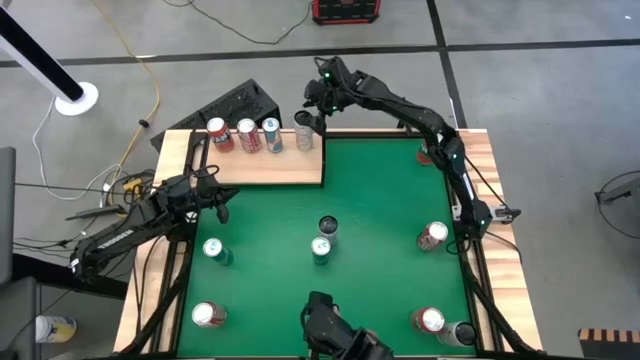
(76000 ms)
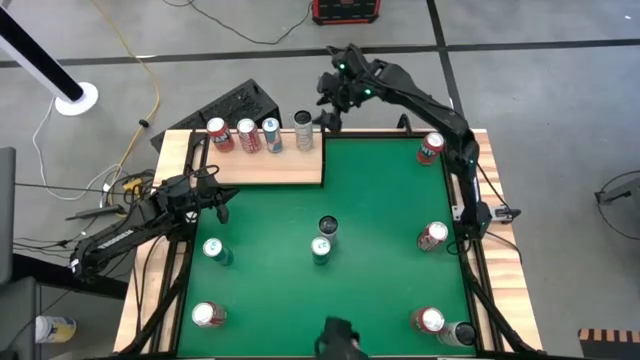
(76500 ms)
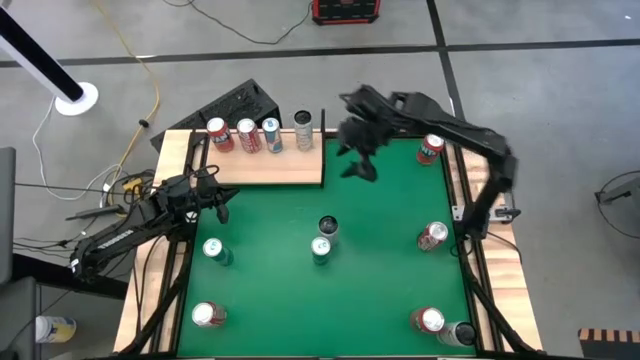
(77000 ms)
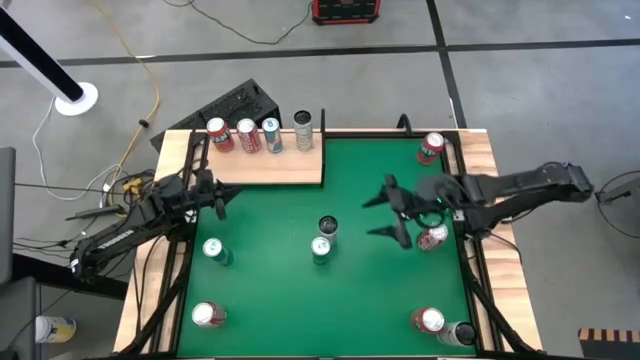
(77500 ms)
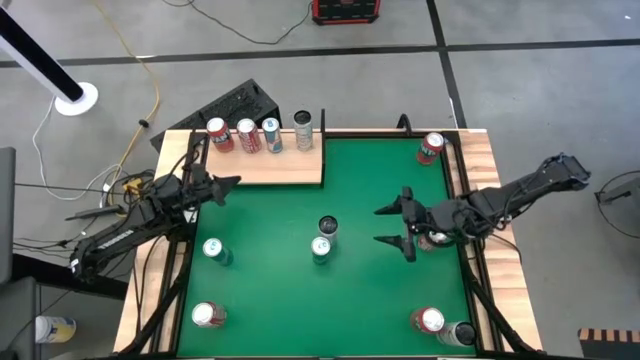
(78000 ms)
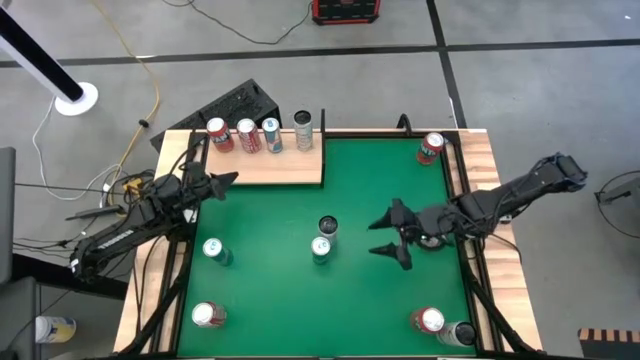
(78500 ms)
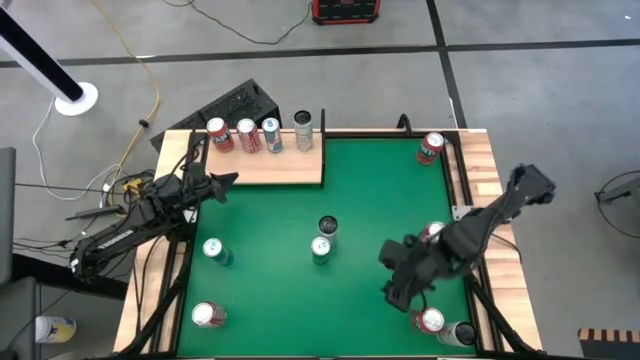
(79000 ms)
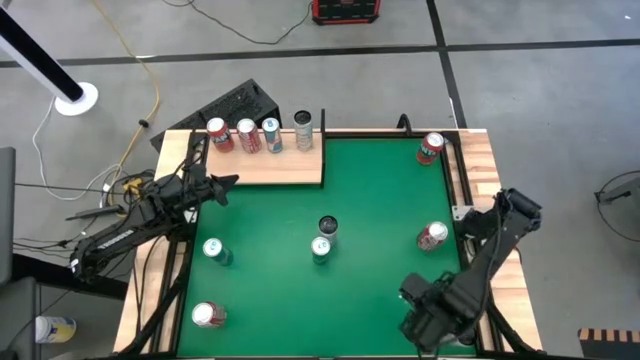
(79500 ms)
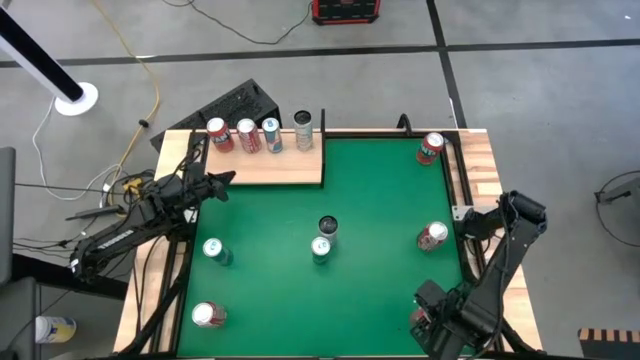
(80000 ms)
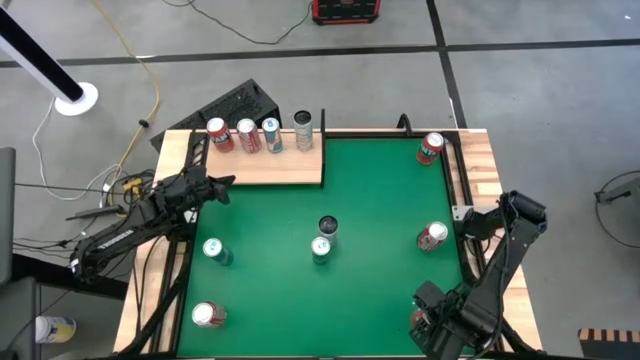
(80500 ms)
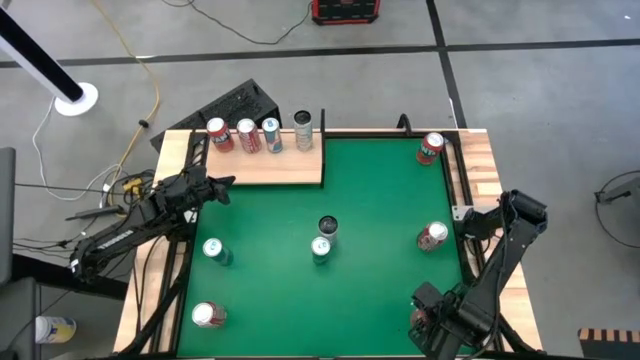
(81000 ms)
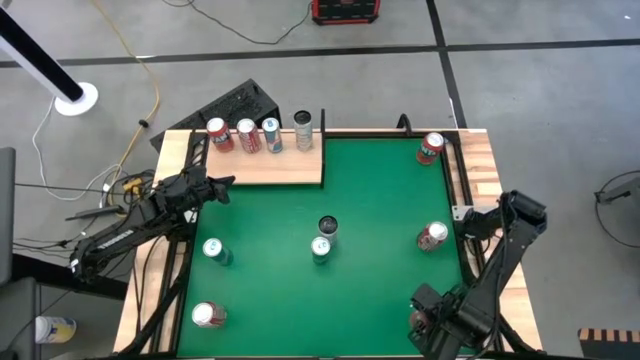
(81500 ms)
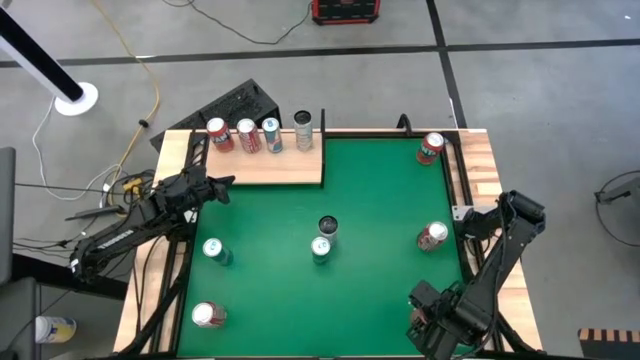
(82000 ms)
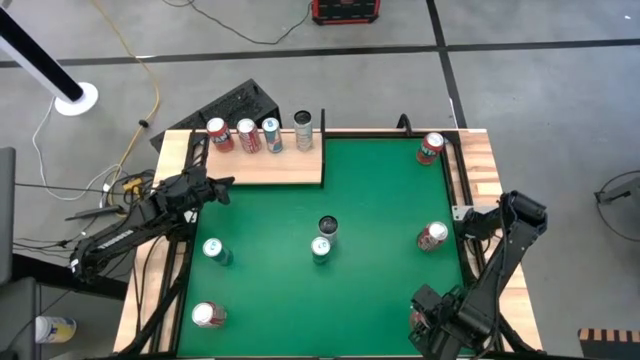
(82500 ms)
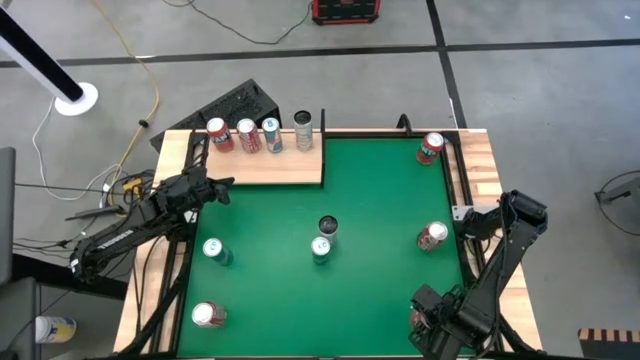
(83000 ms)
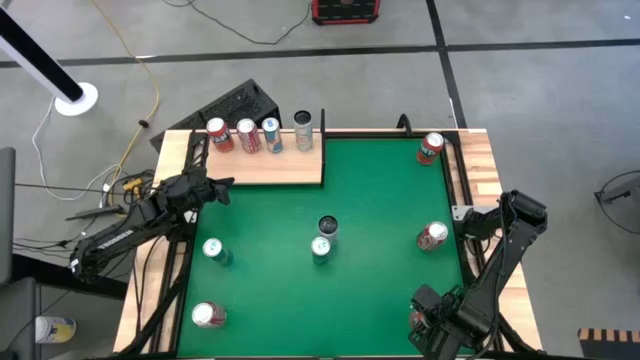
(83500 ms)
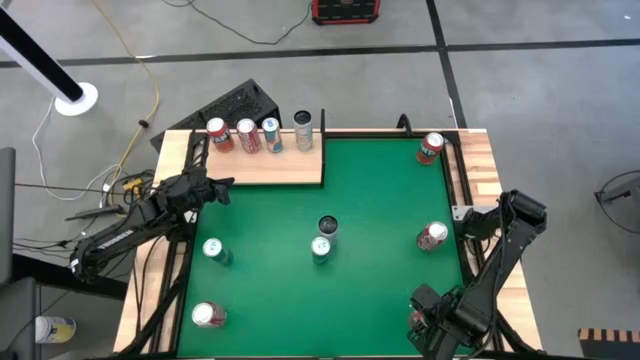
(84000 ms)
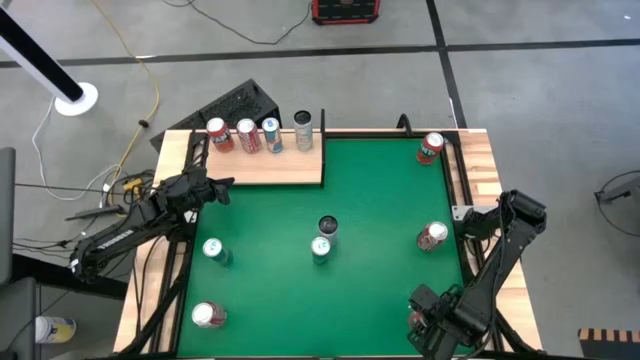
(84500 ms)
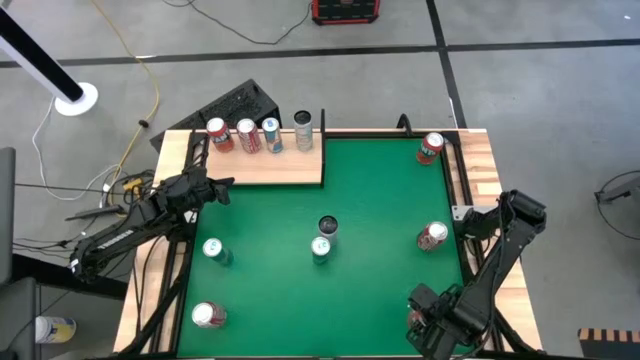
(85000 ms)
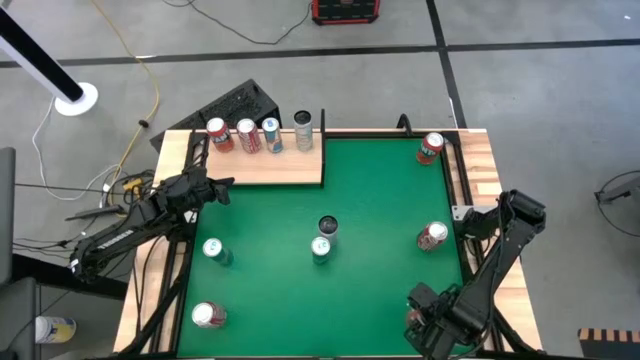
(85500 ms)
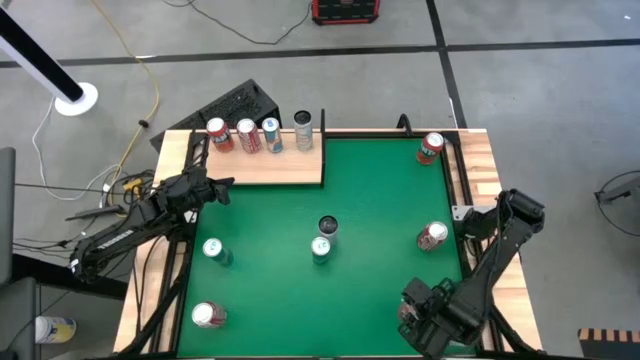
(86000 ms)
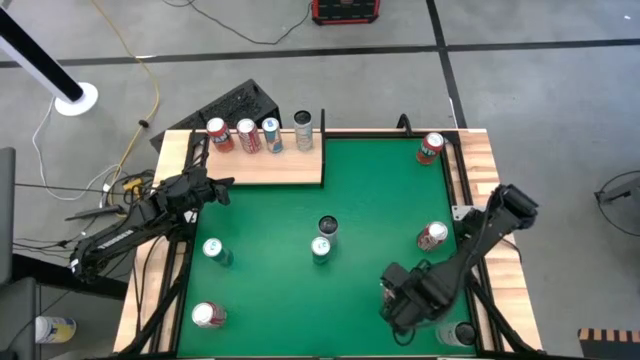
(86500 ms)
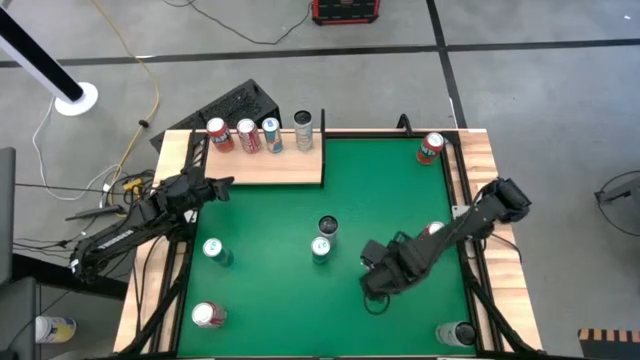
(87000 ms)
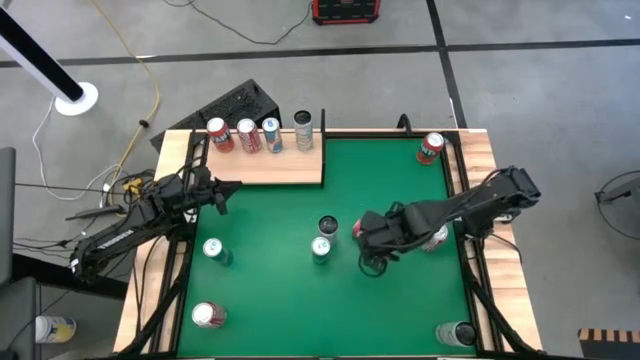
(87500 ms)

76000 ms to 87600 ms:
Task: Place canned beverage on shelf
Put the bottom red soda can on the shelf aligned with the other red soda can

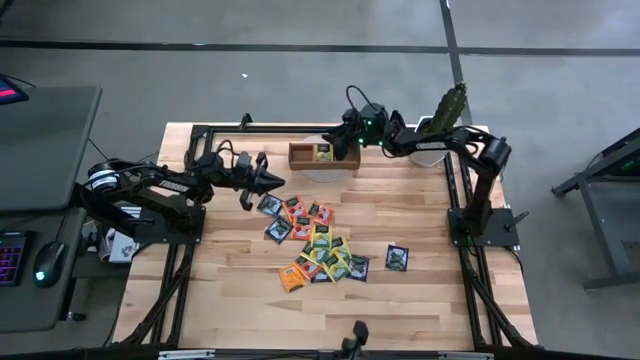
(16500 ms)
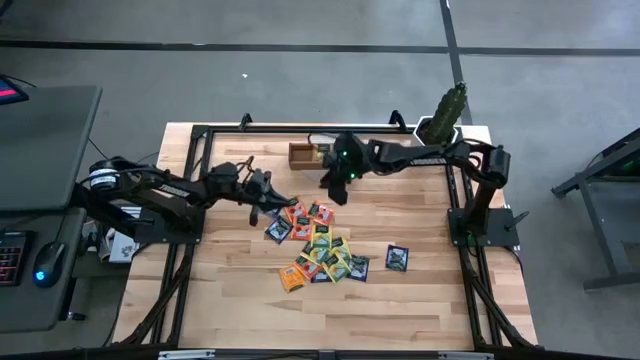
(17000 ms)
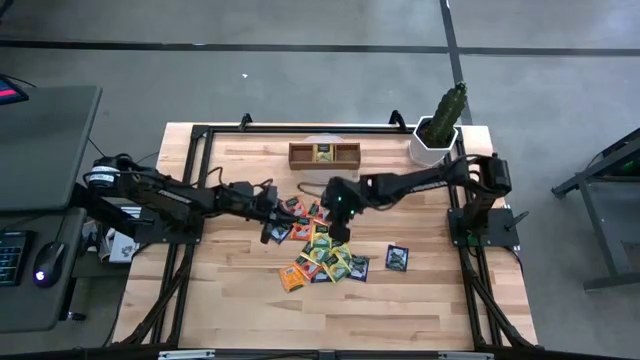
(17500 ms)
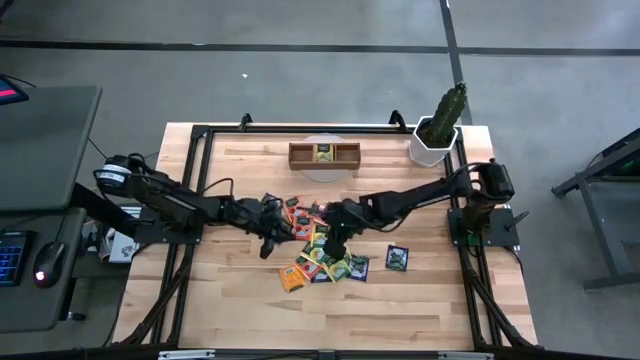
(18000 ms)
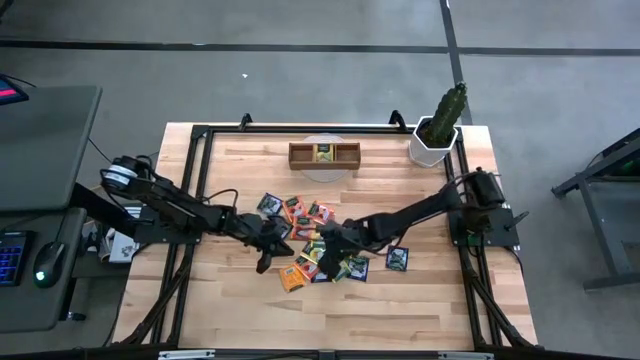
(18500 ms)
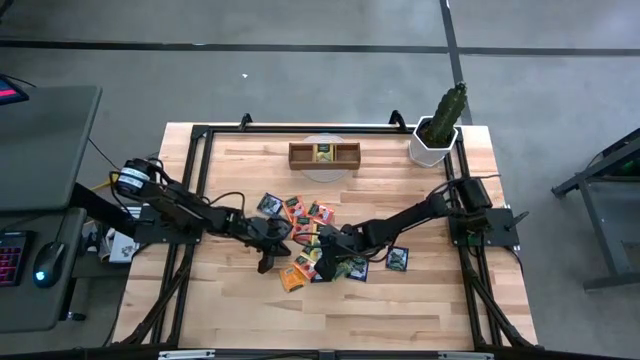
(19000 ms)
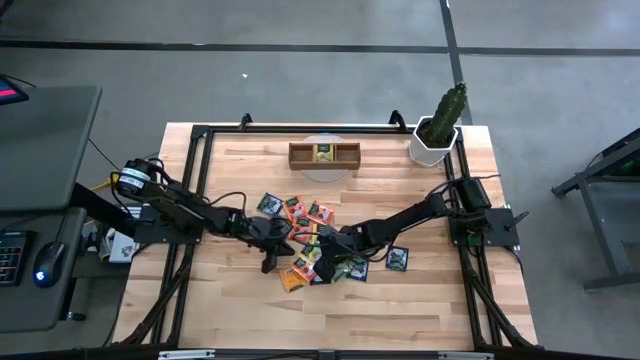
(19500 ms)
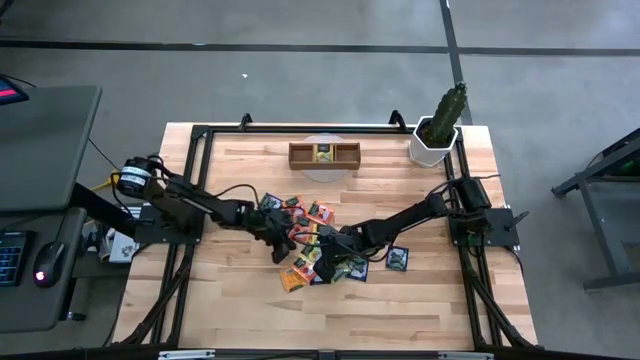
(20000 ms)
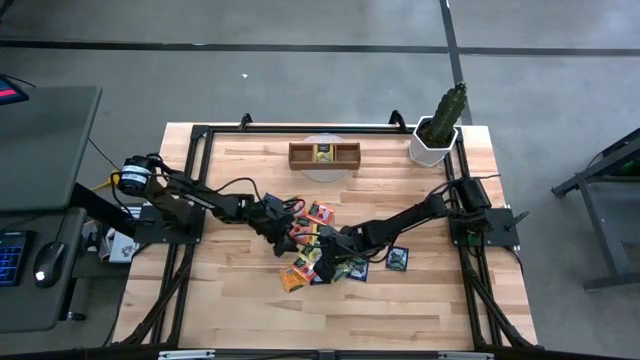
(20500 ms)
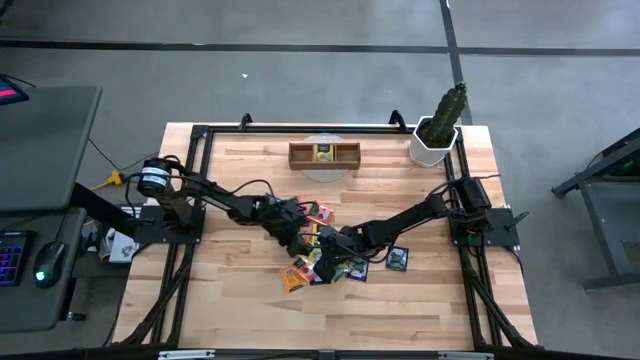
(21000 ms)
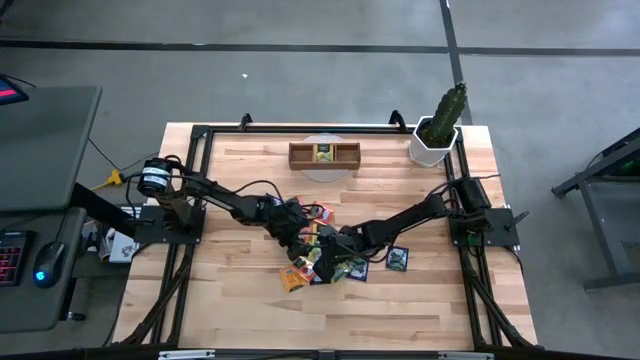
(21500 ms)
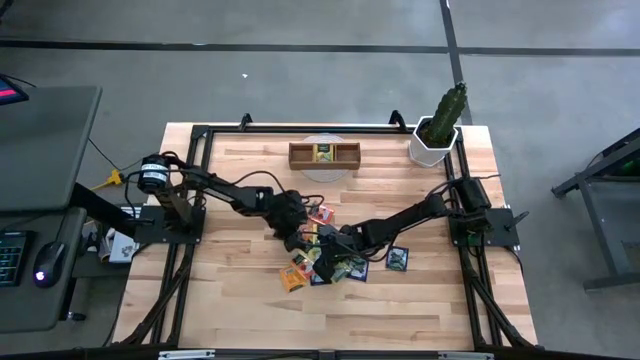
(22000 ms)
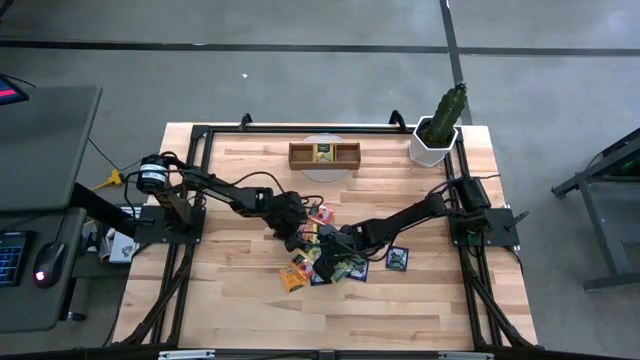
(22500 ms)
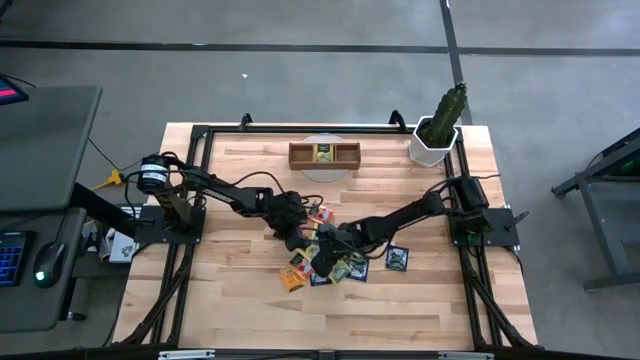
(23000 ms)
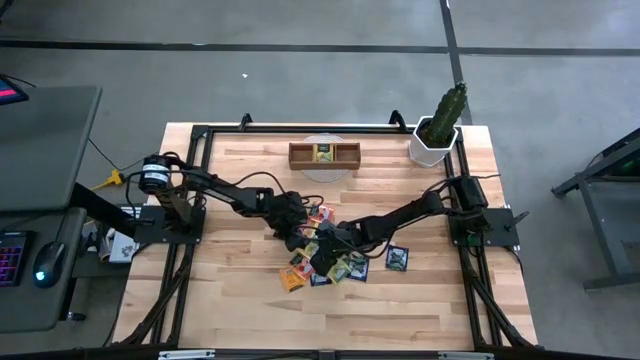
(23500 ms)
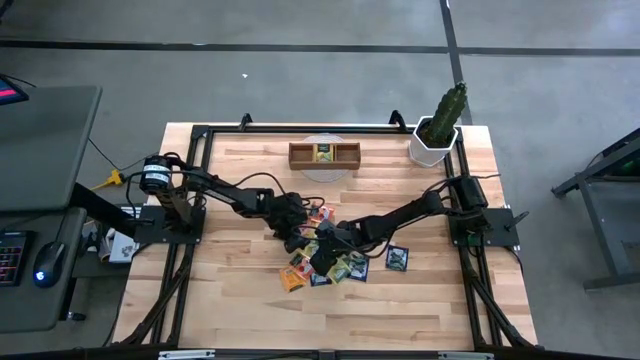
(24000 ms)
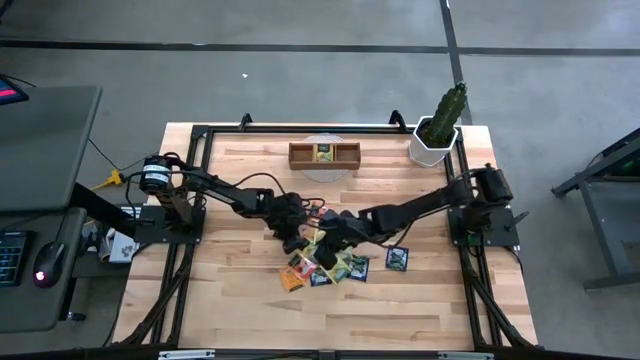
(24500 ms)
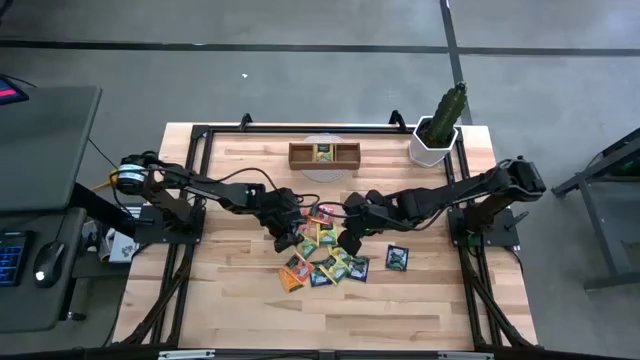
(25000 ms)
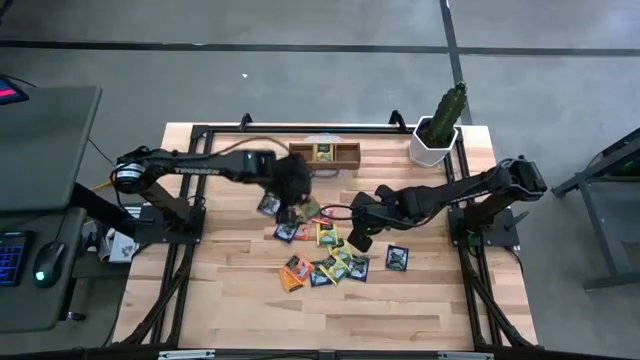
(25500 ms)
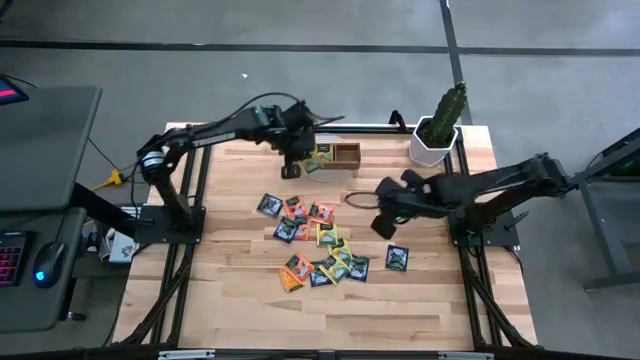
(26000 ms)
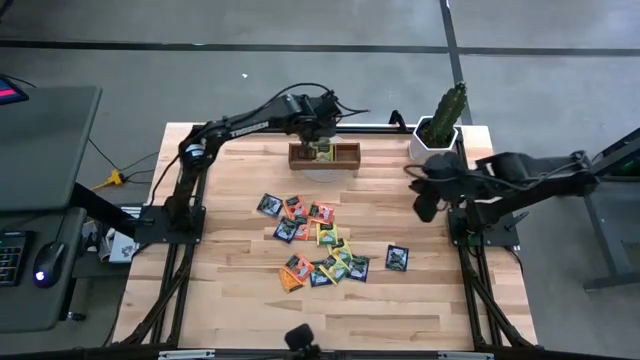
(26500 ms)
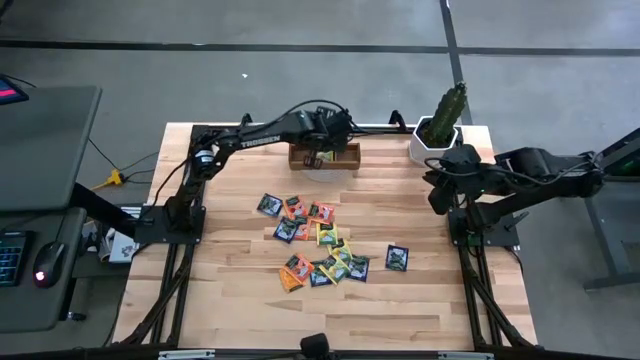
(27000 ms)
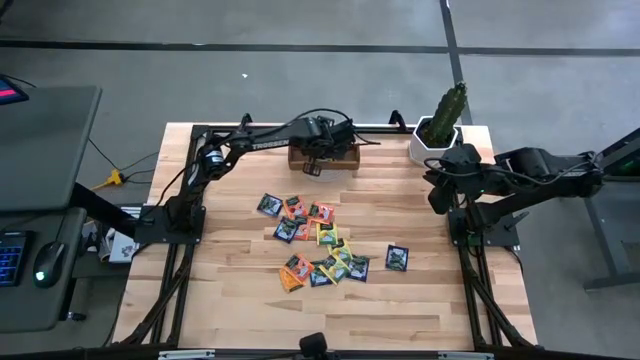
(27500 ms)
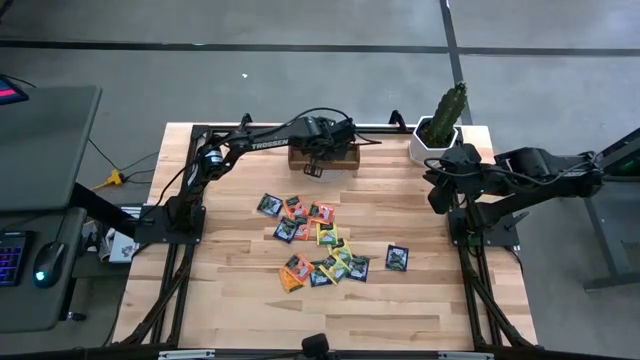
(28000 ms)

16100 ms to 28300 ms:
Task: Pick & Place Tea
Put the yellow tea bag in the middle compartment of the organizer
